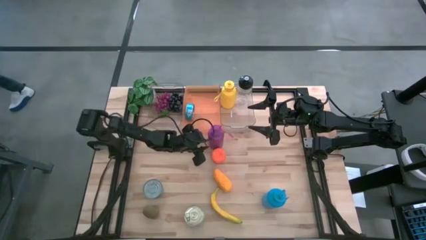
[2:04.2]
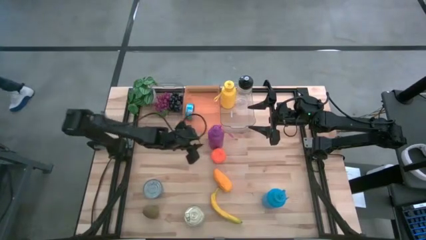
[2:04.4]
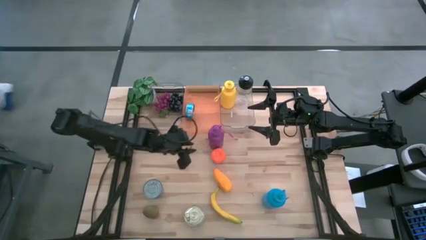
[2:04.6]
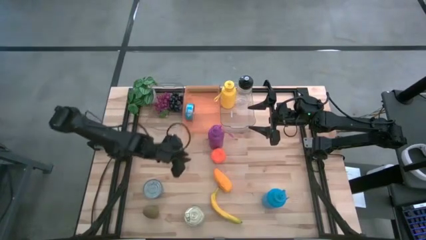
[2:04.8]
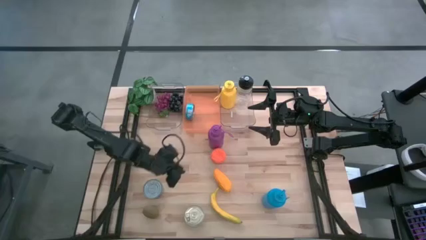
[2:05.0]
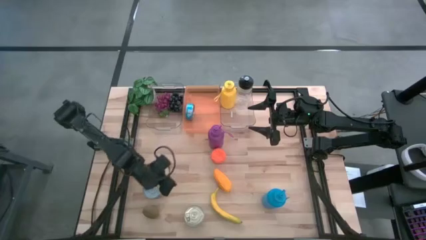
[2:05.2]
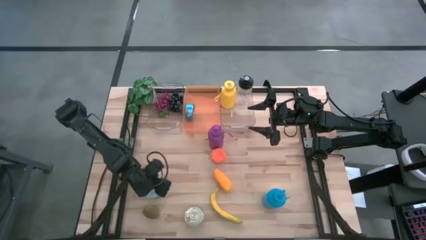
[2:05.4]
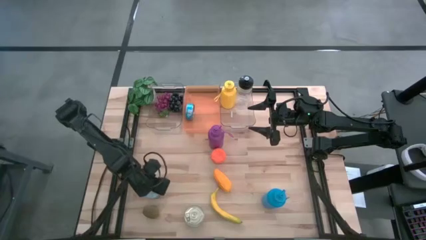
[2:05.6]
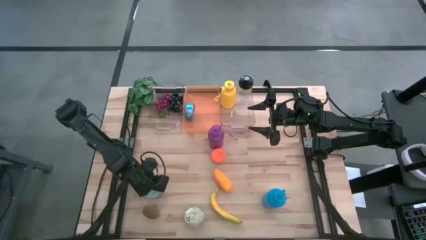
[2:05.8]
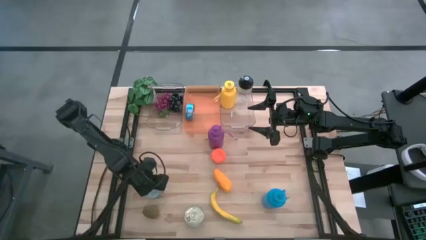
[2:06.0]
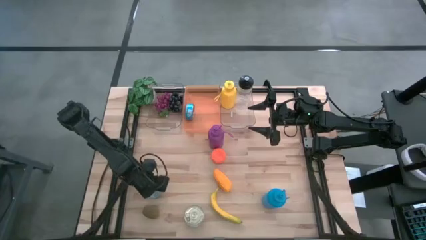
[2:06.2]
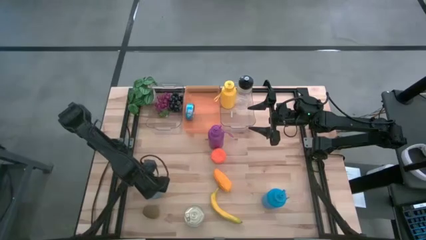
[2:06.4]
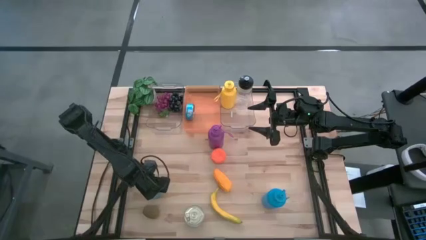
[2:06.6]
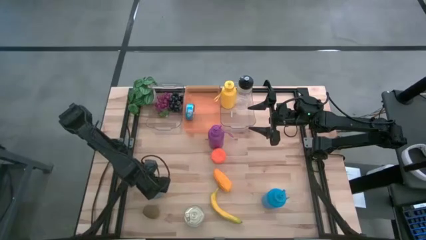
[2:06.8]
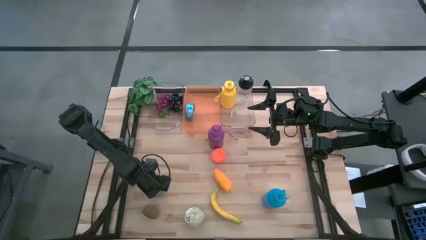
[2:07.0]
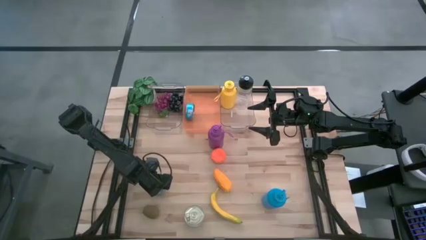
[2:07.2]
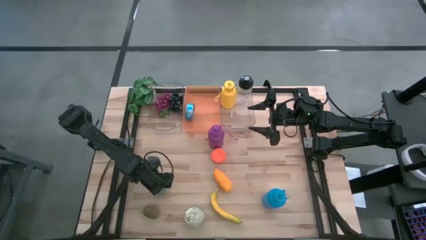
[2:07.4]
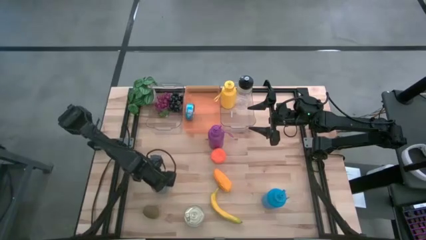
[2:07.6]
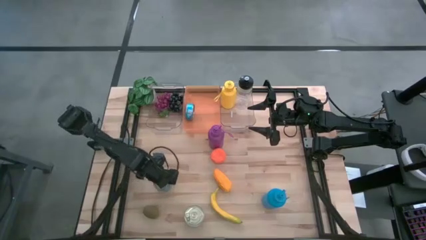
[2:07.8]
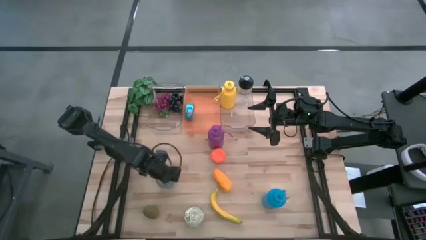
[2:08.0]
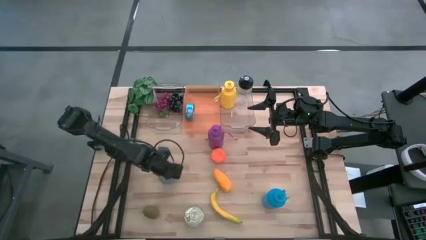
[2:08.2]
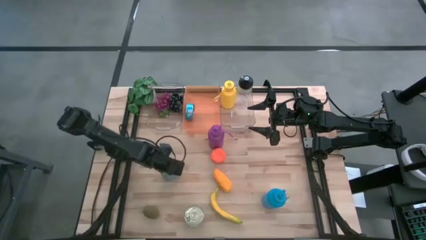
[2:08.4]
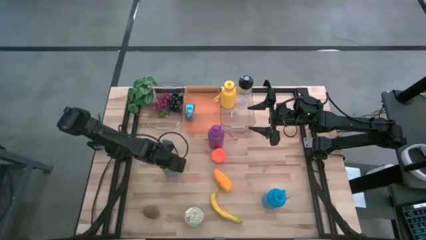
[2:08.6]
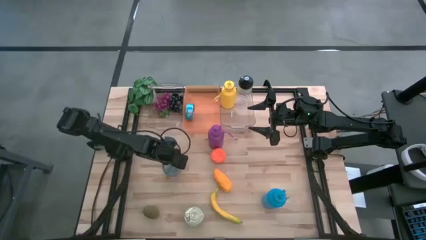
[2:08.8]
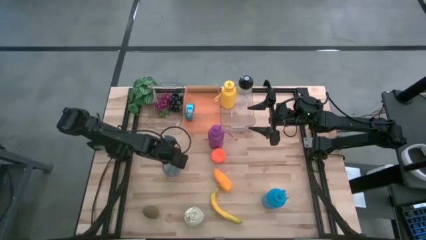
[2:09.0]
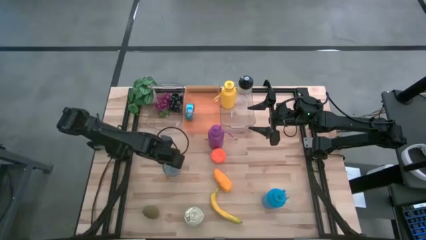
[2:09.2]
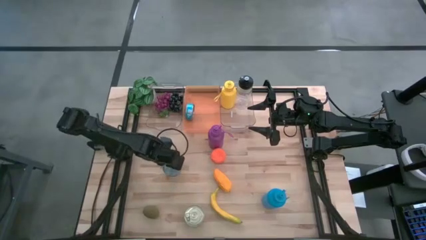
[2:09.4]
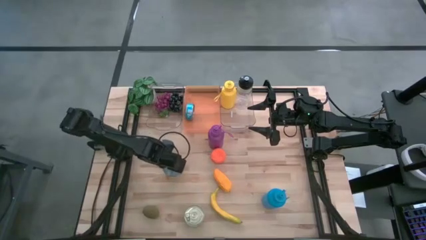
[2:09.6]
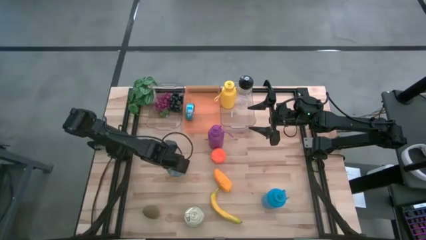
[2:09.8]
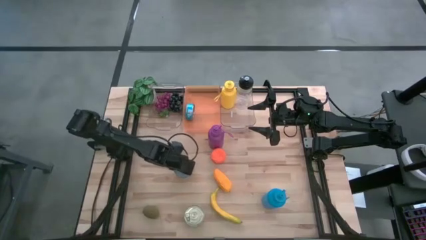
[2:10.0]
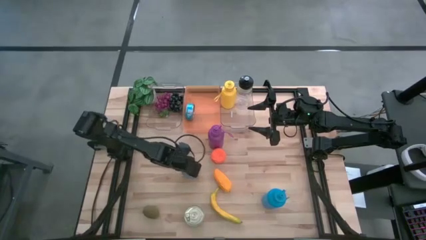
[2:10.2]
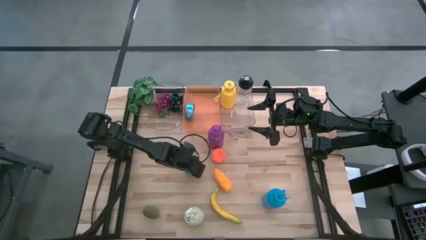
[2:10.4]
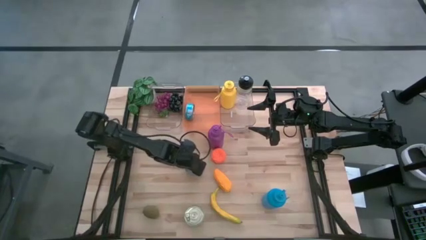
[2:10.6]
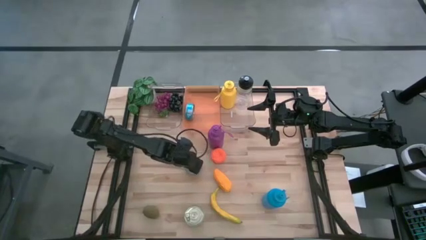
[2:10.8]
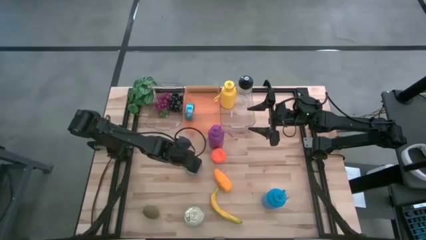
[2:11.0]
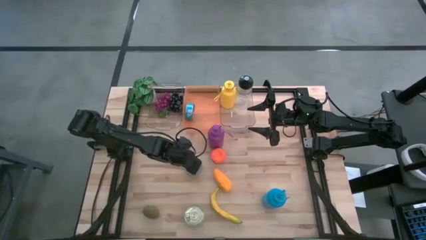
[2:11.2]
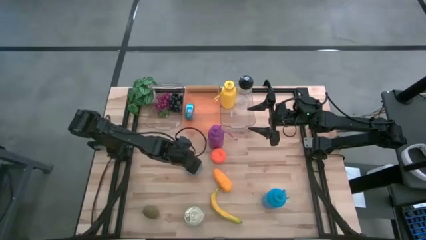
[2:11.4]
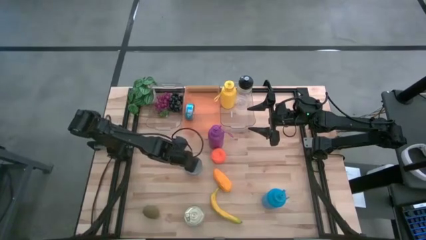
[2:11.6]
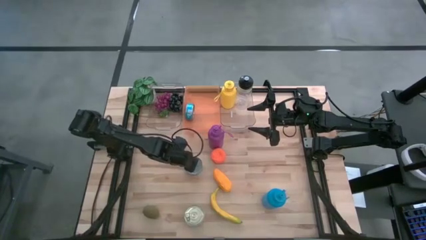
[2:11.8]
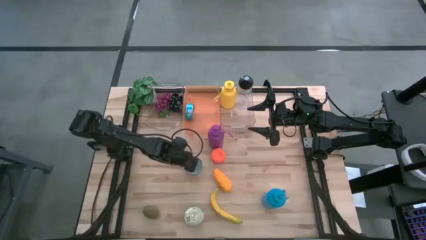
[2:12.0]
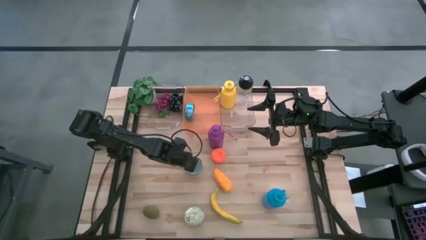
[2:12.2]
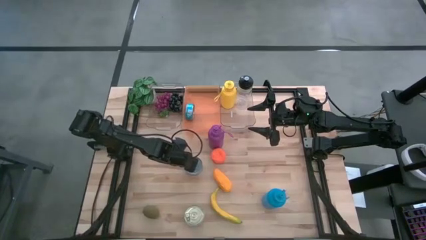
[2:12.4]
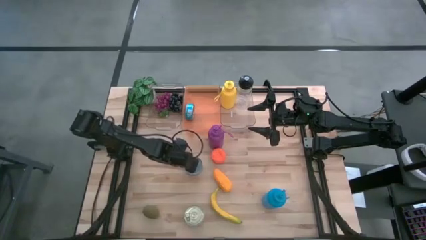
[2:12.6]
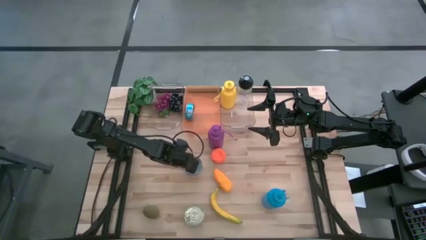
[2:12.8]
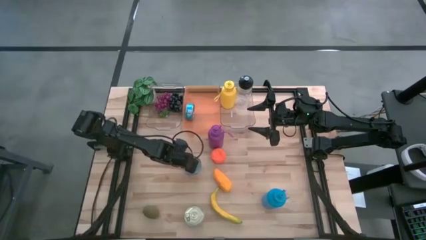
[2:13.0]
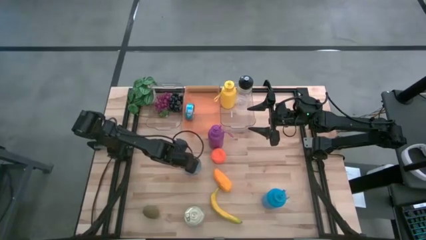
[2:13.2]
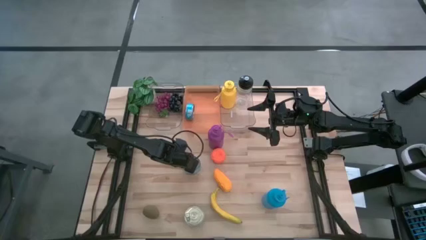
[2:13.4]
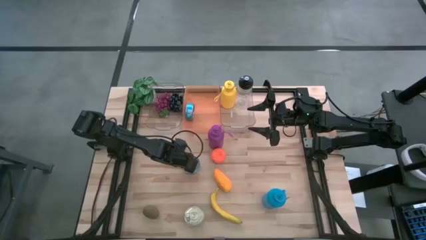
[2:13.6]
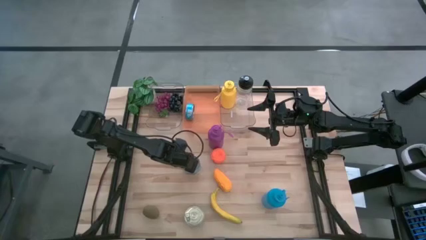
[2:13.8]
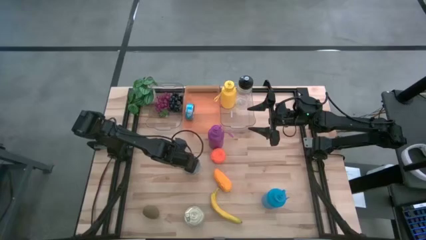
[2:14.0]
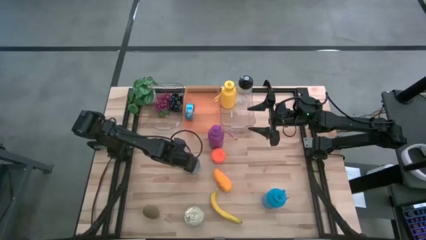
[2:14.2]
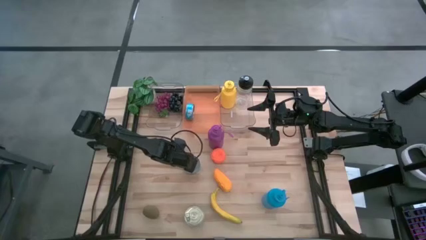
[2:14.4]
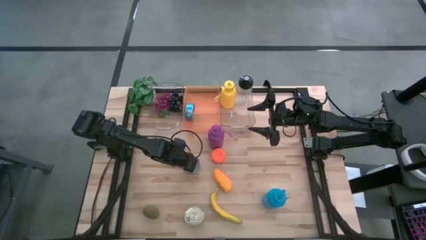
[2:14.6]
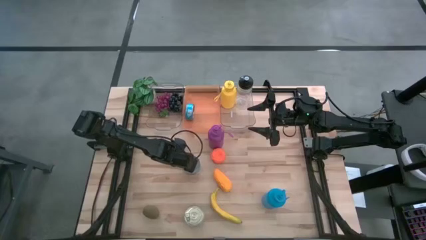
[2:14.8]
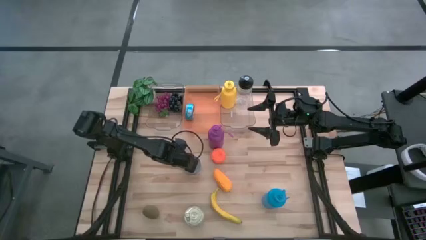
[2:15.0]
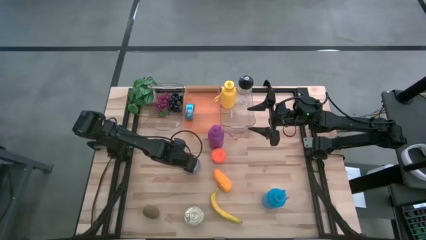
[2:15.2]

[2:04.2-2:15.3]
Task: Pick & Place Food Item
Put the blue tuna can into the orange bin

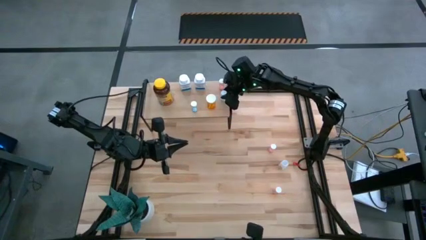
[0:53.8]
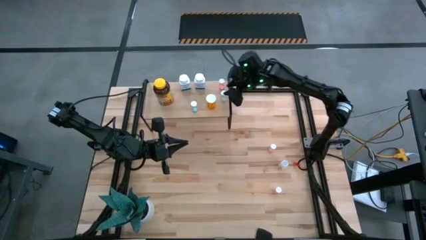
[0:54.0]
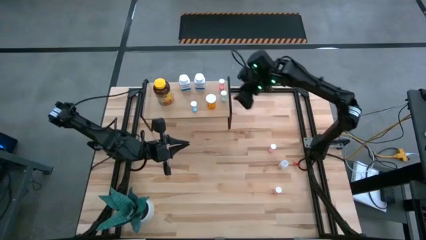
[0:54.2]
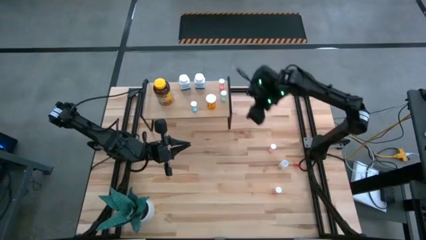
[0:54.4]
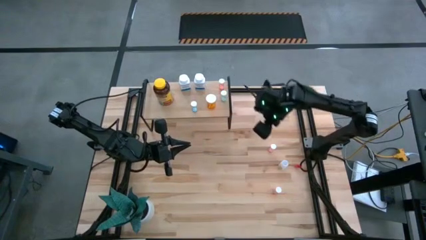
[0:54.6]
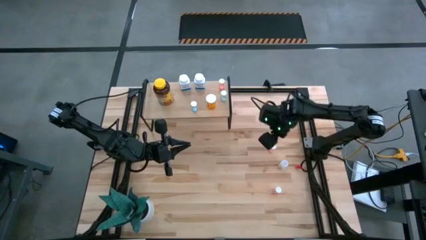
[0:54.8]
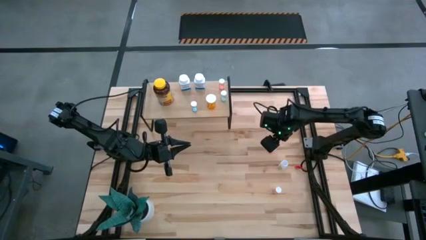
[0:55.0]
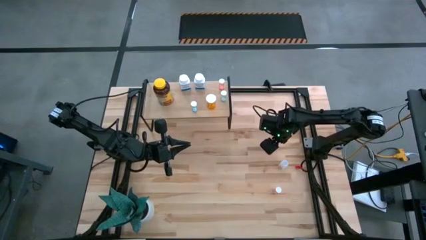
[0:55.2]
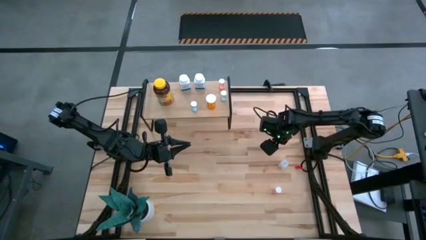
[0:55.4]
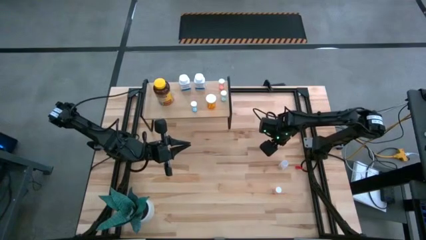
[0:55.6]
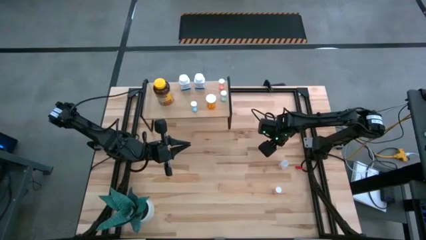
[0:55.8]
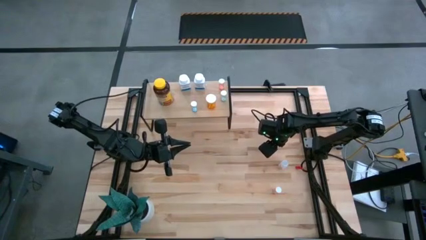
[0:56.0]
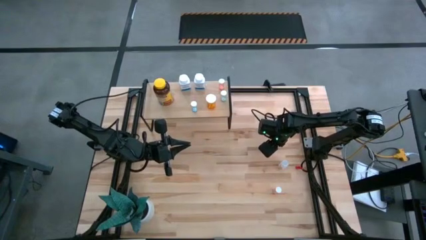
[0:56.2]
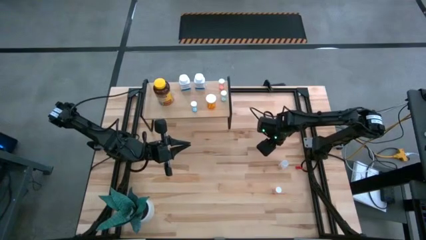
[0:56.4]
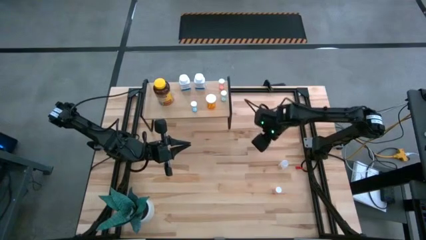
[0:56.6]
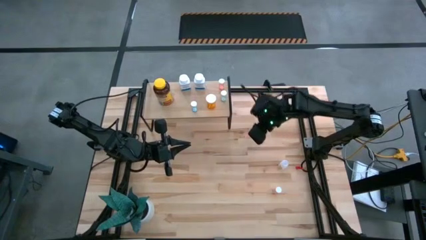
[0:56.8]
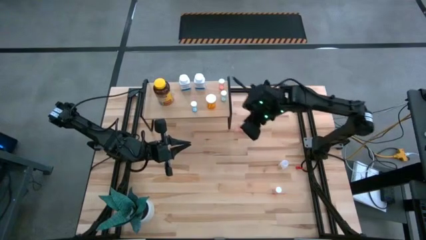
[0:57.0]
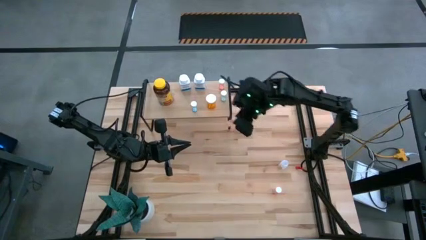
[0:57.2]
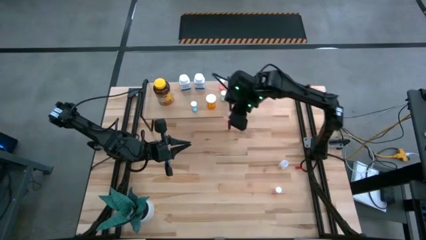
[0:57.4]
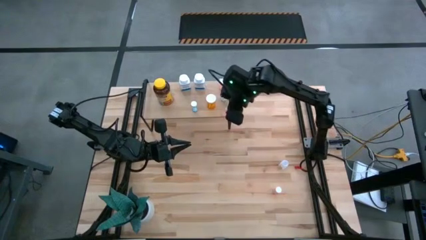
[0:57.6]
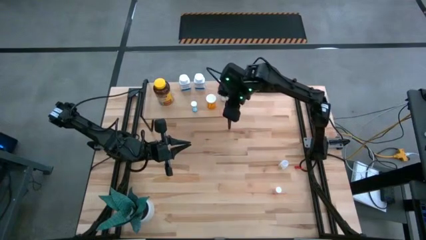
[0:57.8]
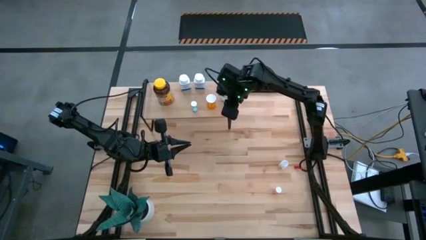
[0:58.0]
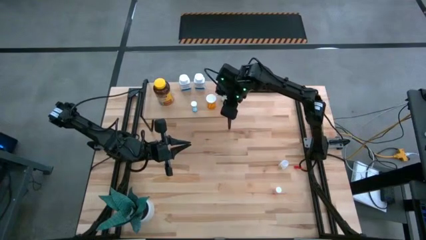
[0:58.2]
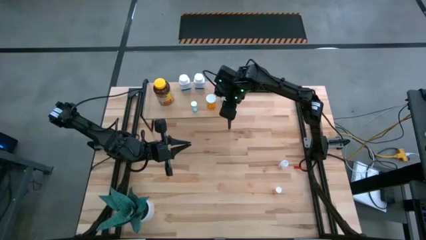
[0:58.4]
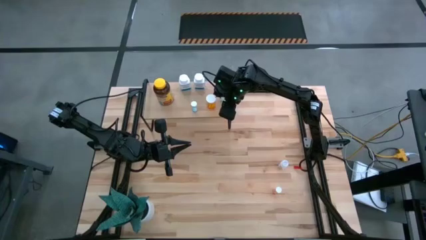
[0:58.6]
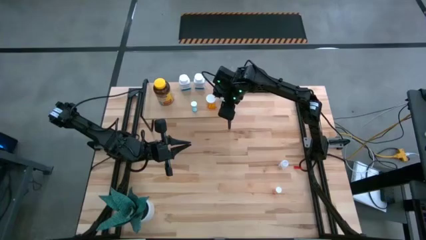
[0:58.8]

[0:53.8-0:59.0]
Task: Pick and place medicine bottles onto shelf by color
Put the top pink pill bottle on the shelf

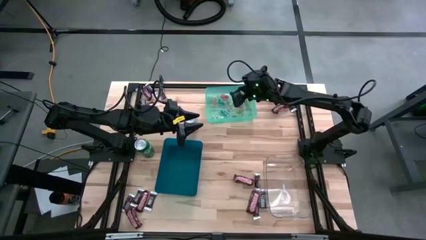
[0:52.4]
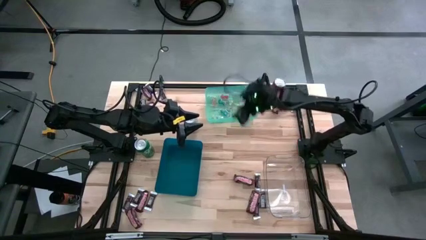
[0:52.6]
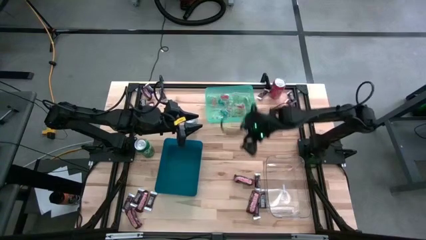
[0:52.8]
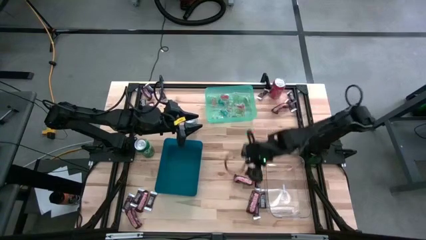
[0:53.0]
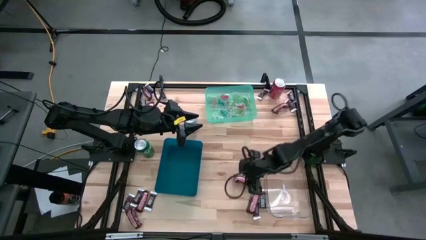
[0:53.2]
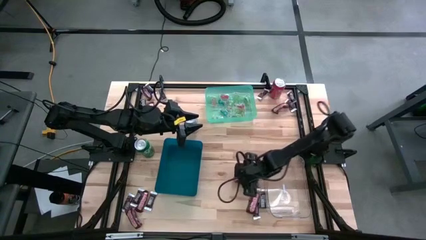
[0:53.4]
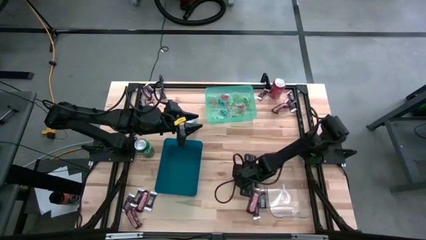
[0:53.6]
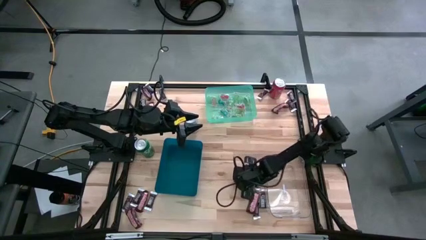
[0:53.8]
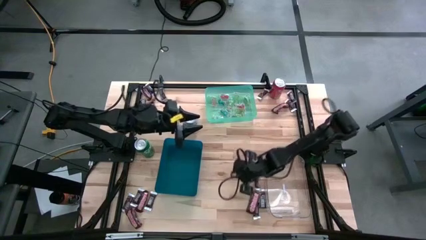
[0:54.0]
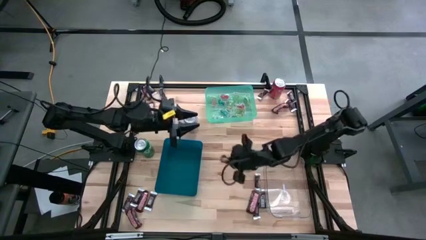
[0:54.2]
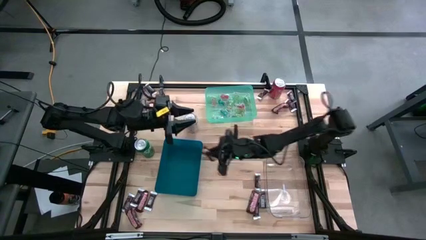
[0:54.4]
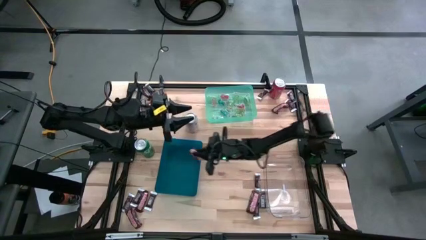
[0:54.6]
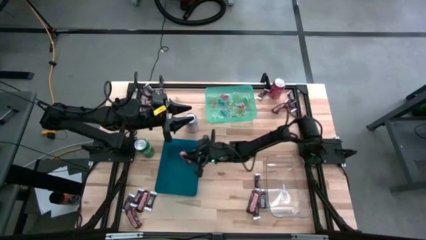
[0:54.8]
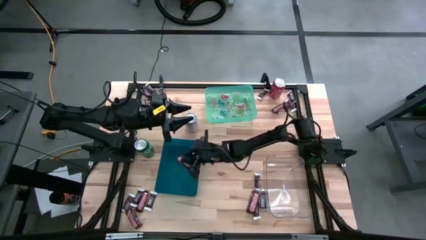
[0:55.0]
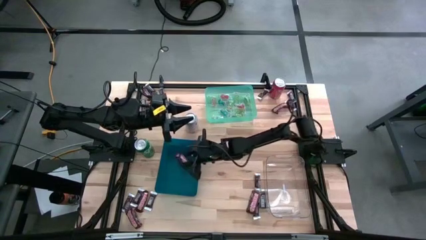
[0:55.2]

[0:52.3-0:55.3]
Task: Organize candy in baskets
Put the brown chocolate into the blue bin
